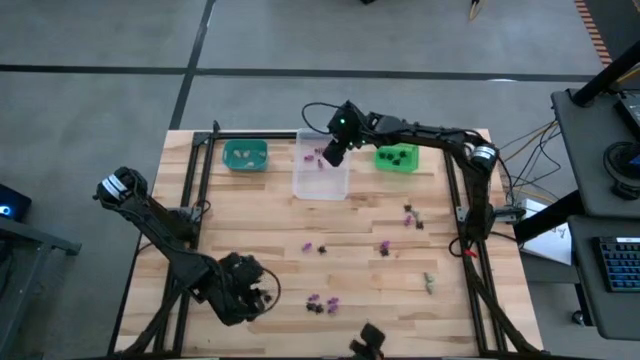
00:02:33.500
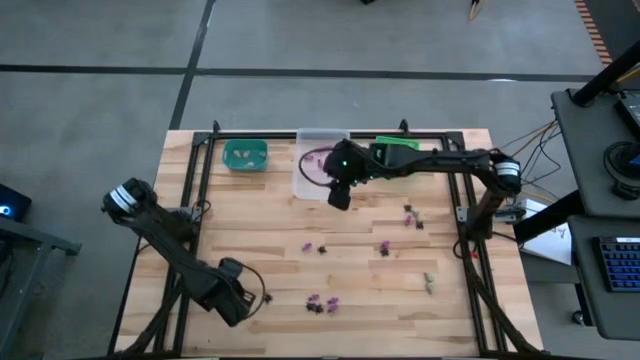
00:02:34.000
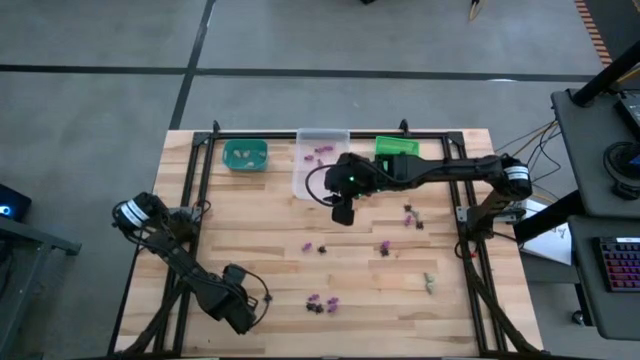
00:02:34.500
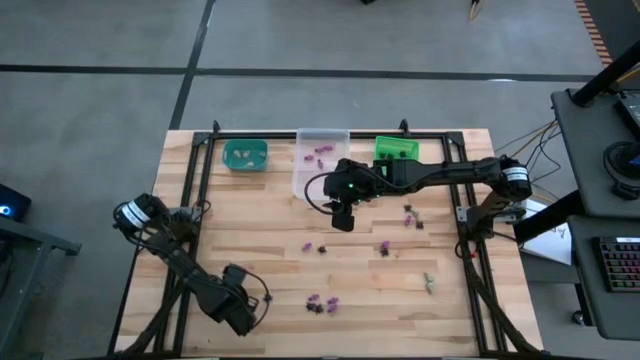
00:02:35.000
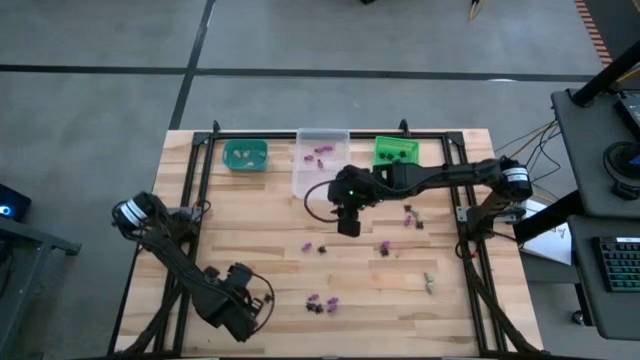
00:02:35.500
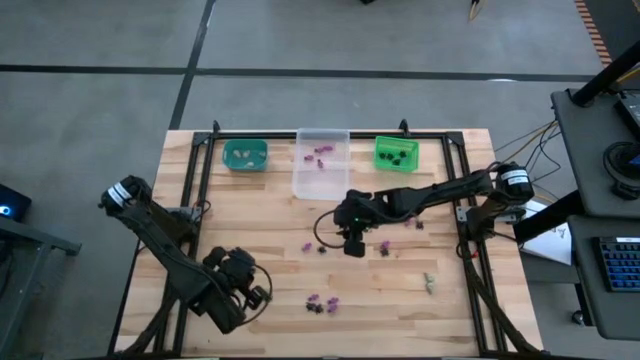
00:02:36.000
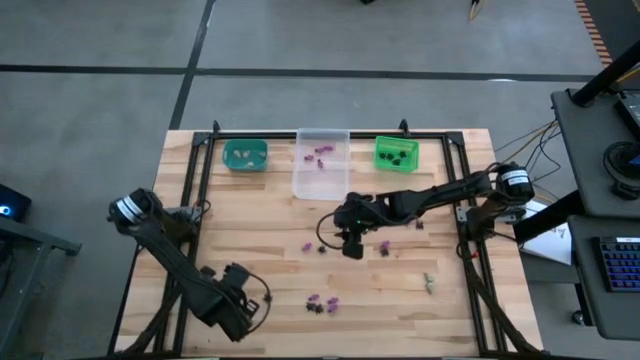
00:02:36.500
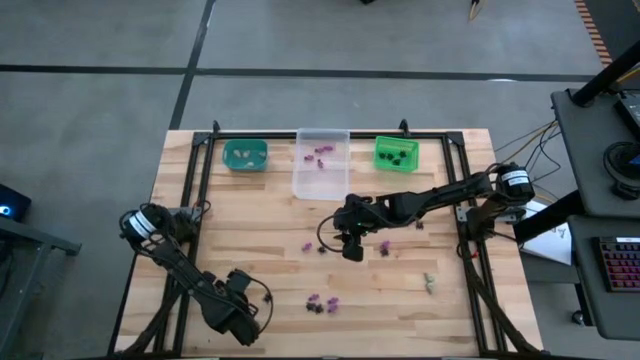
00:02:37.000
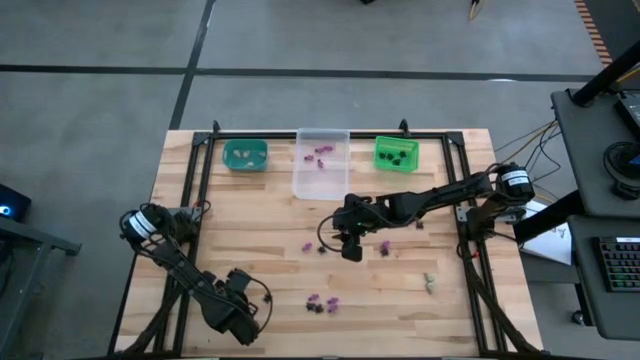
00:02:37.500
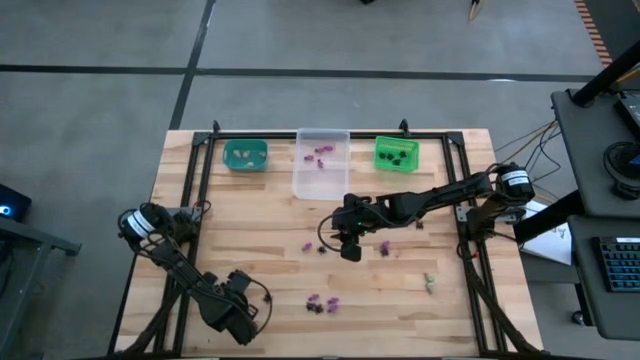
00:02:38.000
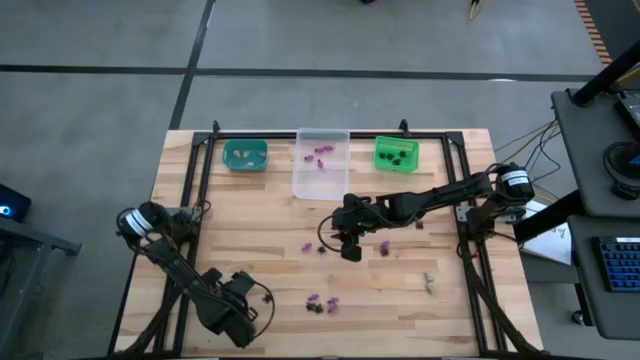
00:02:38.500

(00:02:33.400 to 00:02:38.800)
Task: Sort Halloween decoration
Put the black spider toy into the green bin

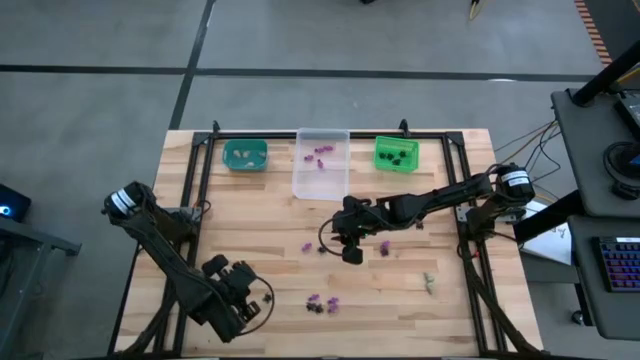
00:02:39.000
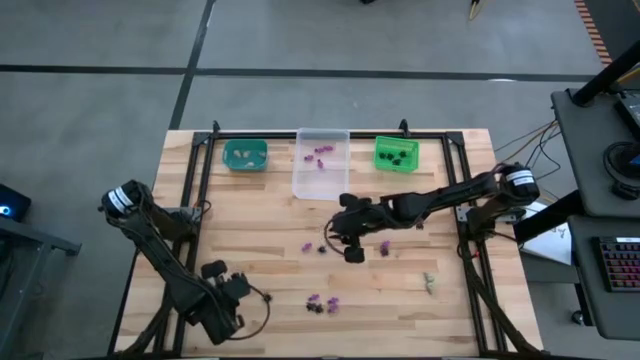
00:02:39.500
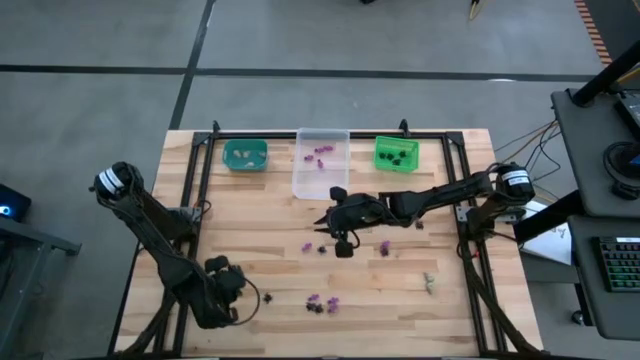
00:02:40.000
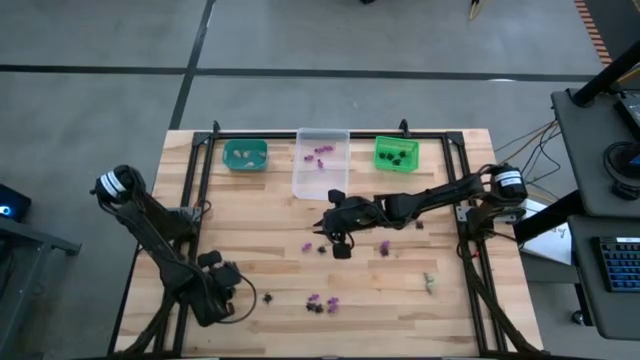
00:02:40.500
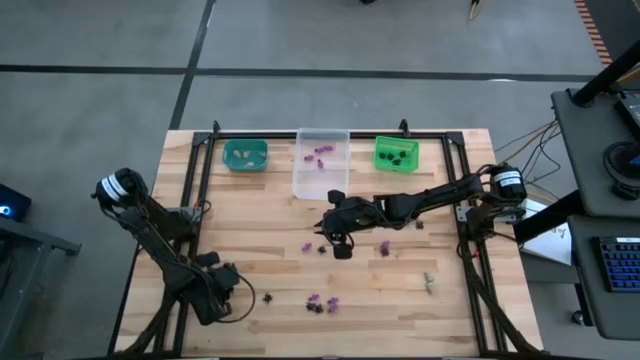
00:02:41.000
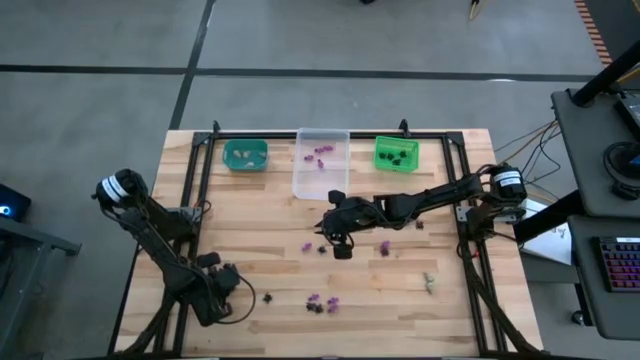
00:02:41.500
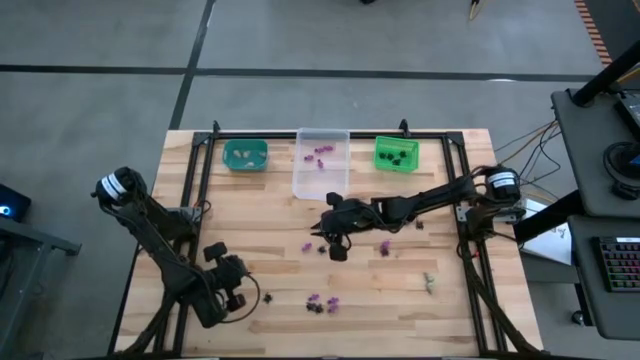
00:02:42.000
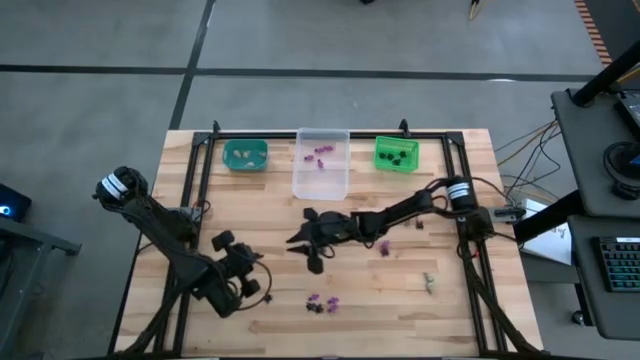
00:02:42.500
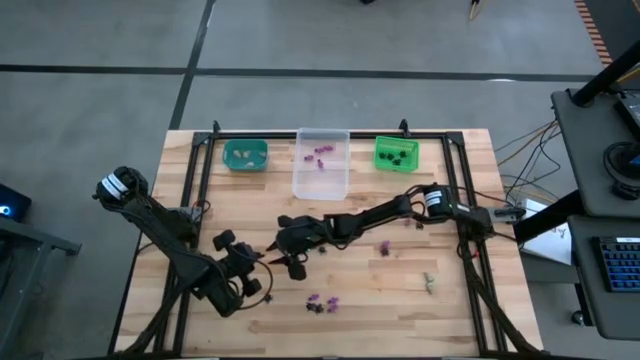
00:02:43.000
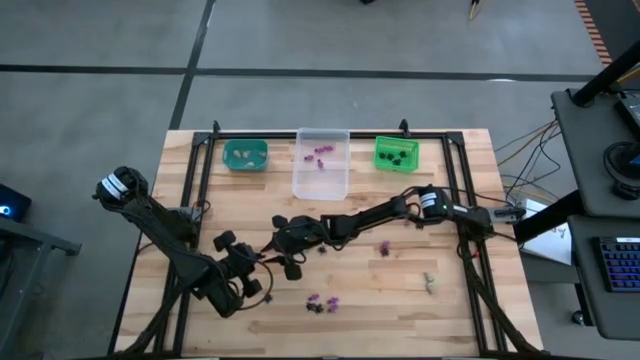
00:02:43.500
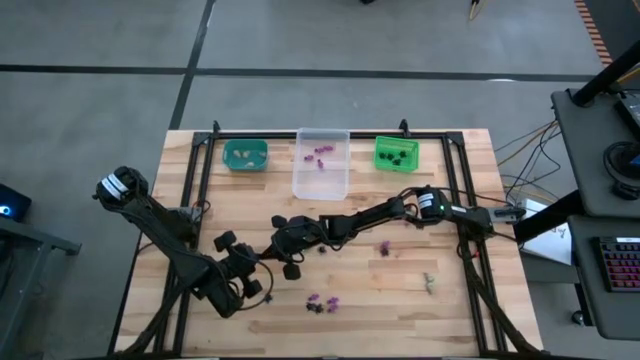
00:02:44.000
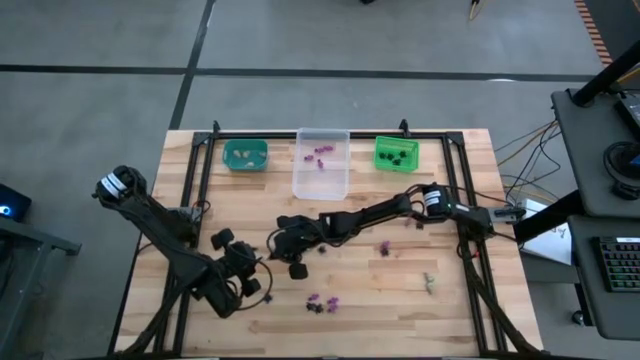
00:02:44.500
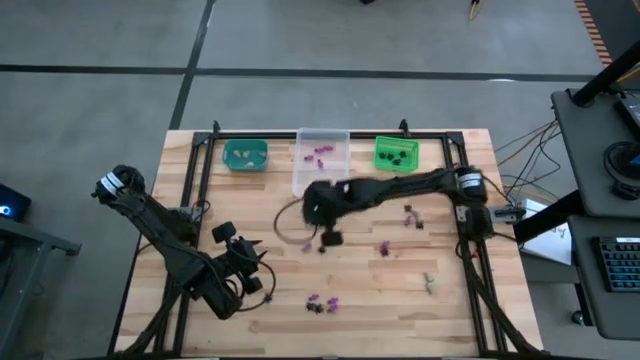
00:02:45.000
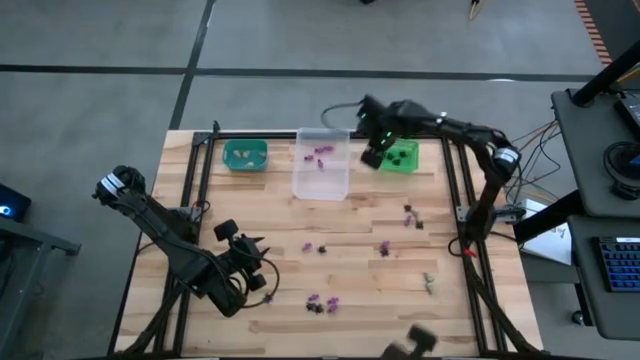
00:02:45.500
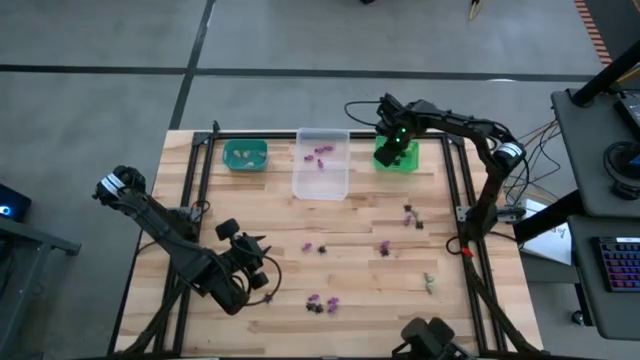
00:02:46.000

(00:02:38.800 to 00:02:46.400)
Put the black spider toy into the green bin

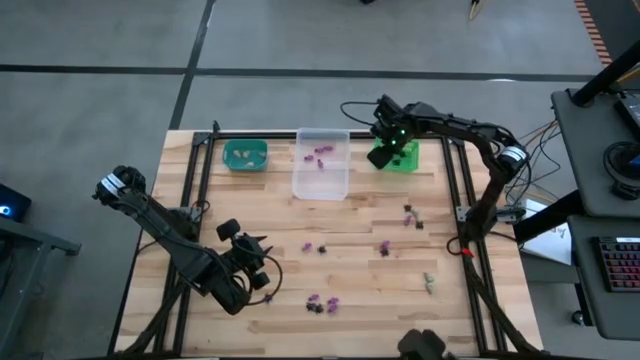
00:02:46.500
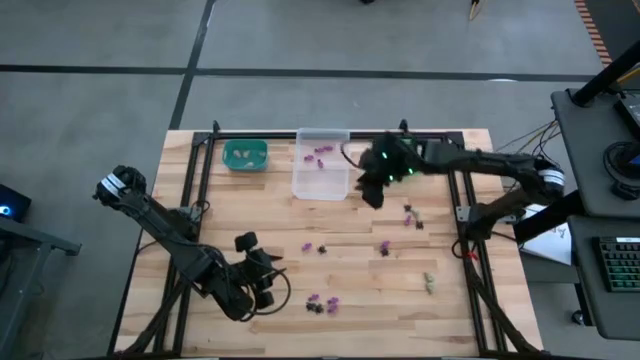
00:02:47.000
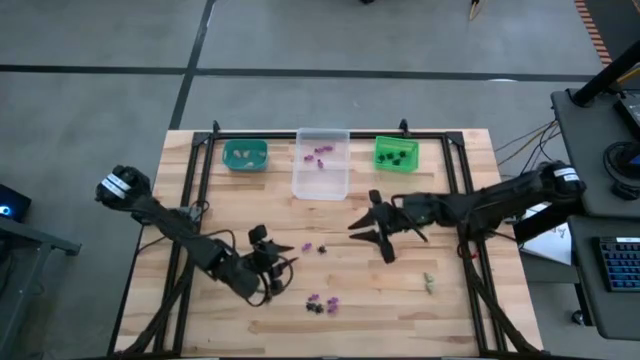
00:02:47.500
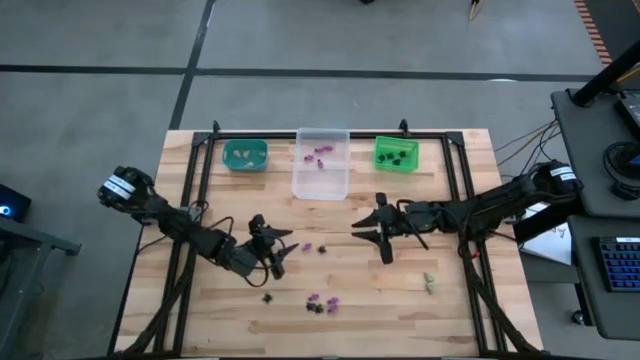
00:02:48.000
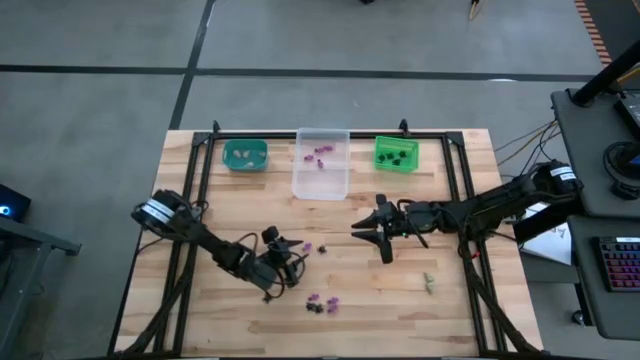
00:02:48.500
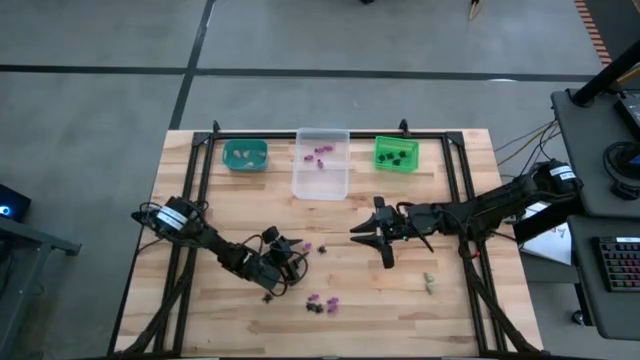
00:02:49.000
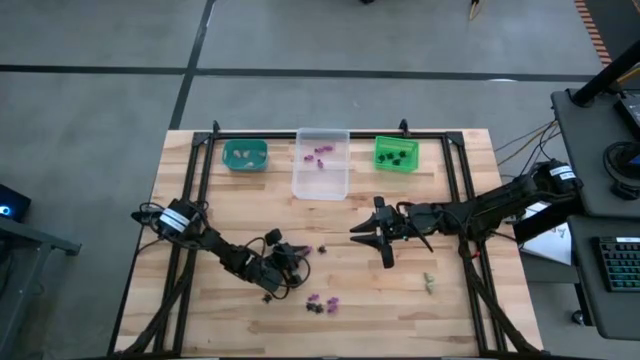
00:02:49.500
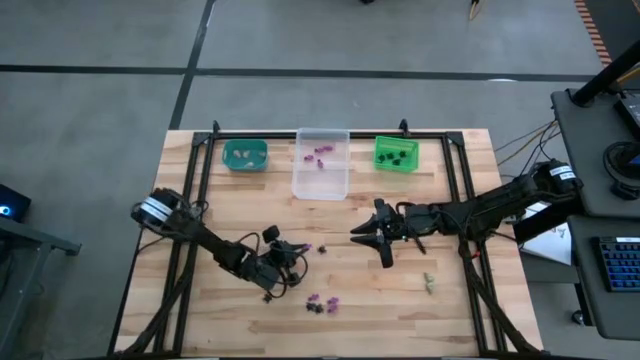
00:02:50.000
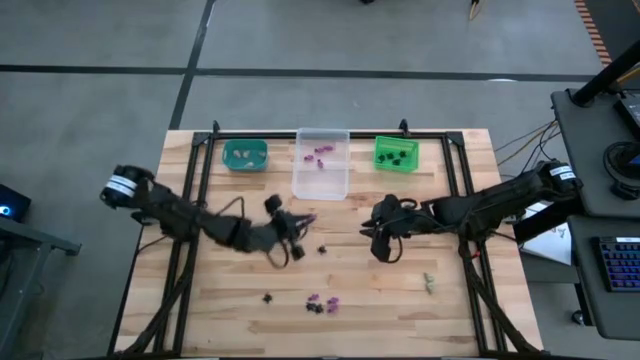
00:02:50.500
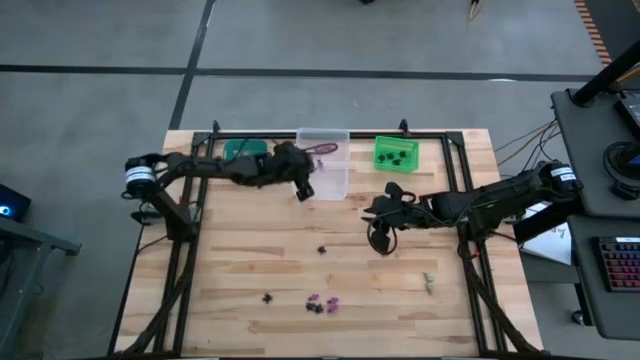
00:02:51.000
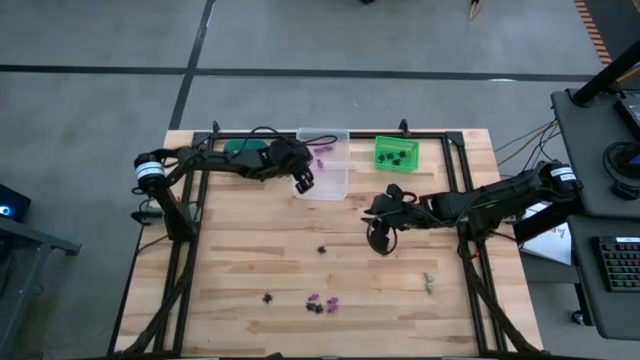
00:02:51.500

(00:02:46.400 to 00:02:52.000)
Put the violet skeleton toy into the transparent bin

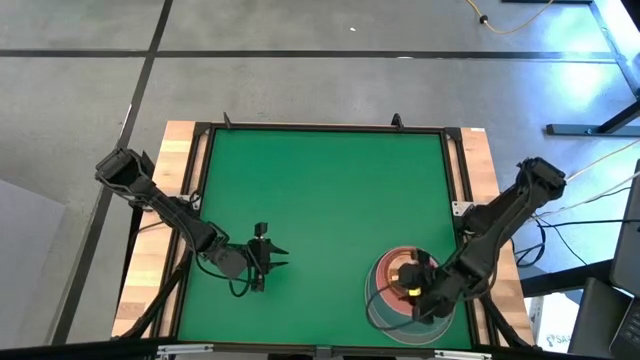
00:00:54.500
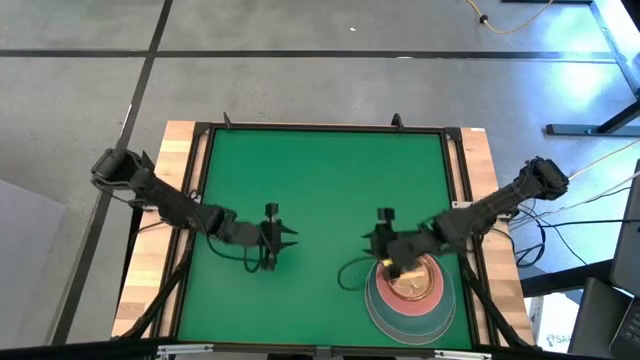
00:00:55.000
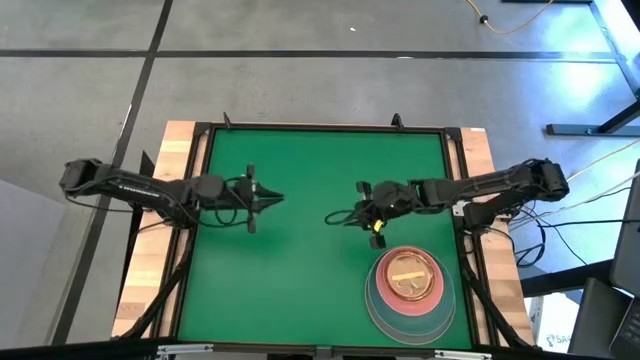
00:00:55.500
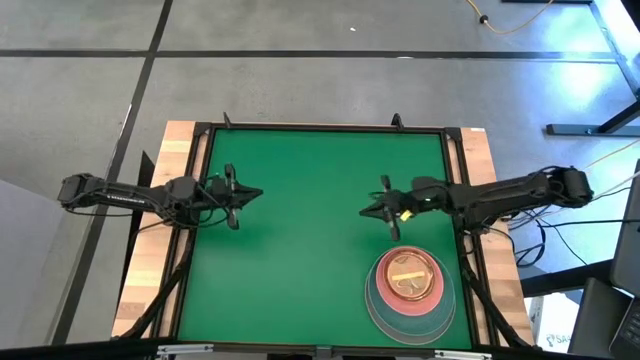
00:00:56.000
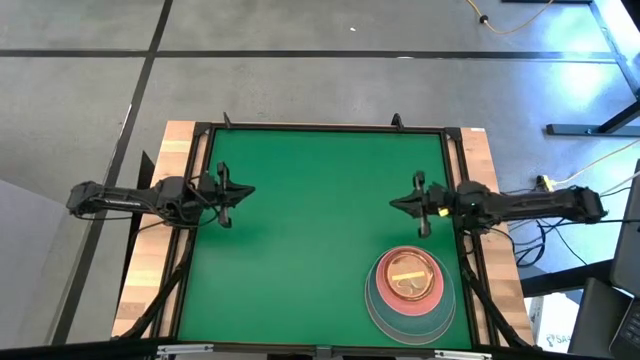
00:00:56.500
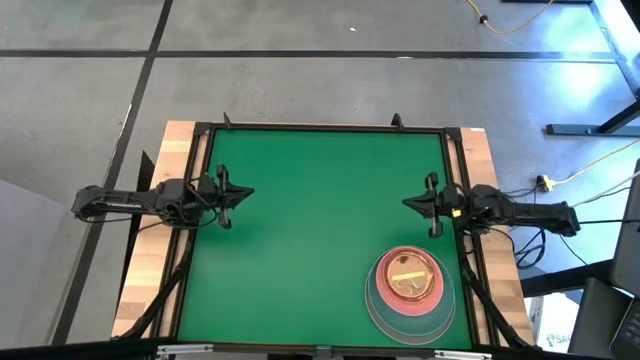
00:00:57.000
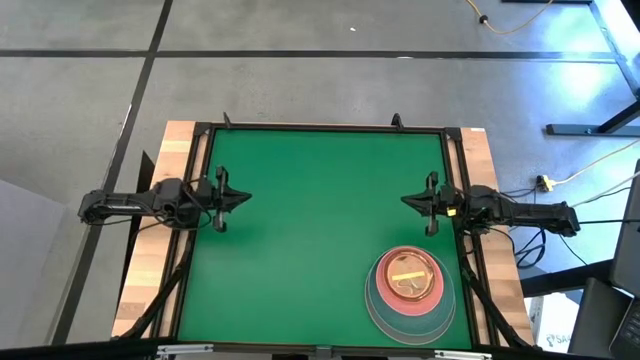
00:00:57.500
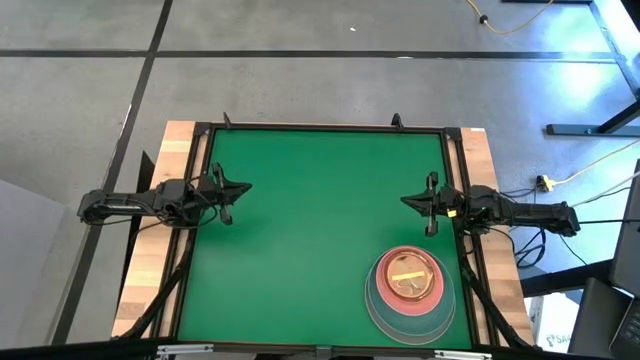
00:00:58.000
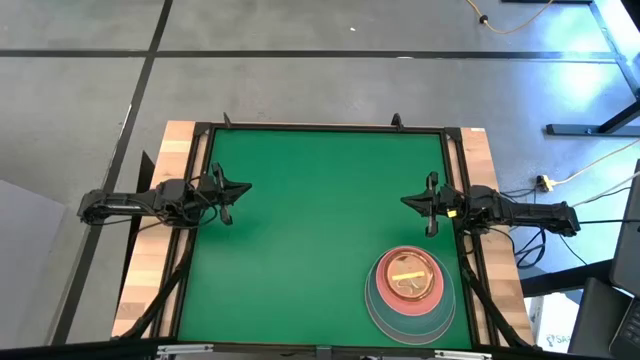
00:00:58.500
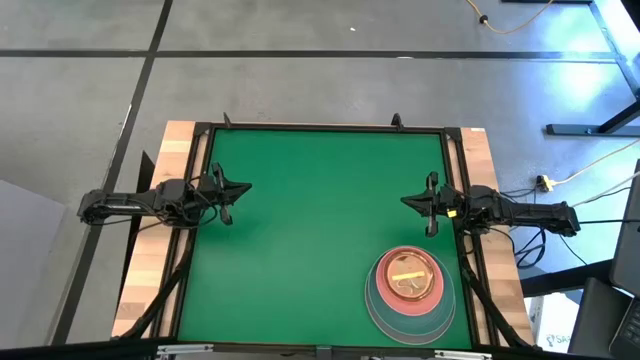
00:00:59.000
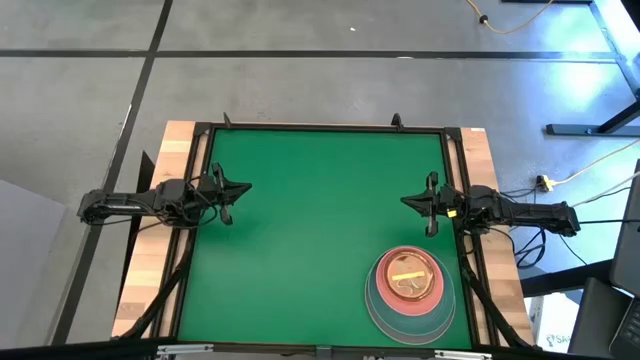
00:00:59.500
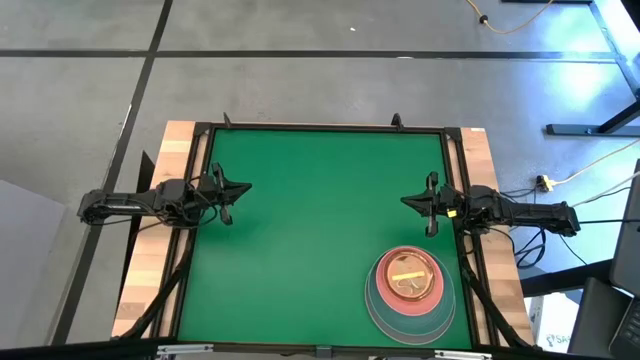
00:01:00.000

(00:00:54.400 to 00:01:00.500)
Task: Stack plastic plates
Return to Home Position
